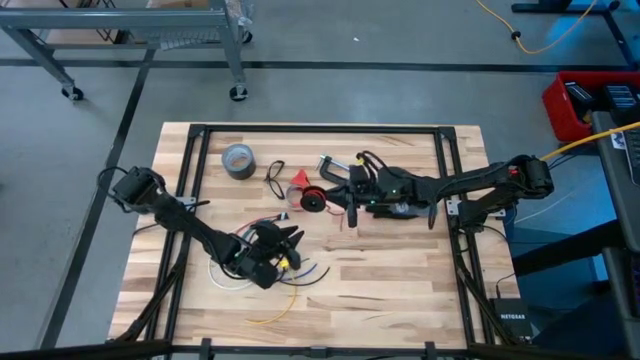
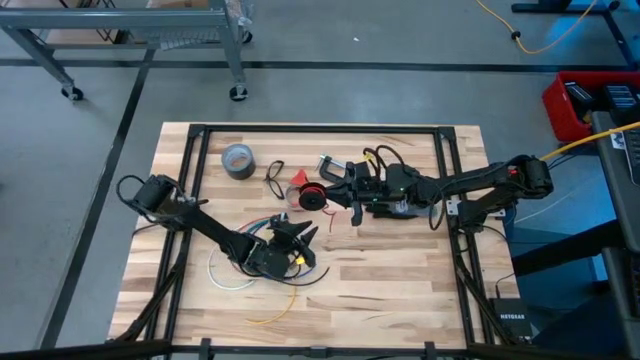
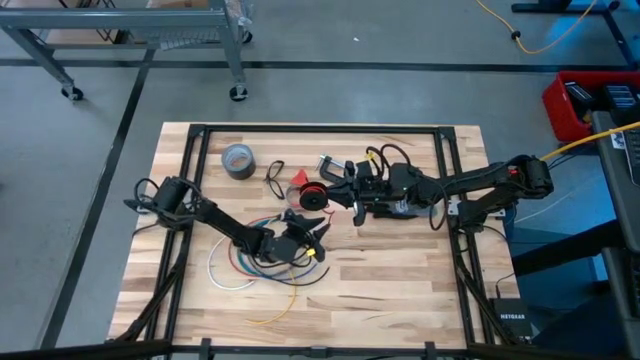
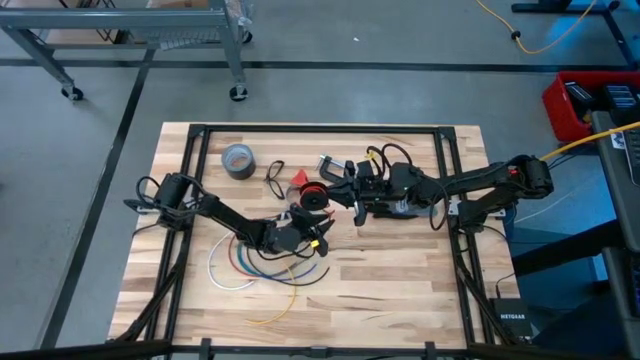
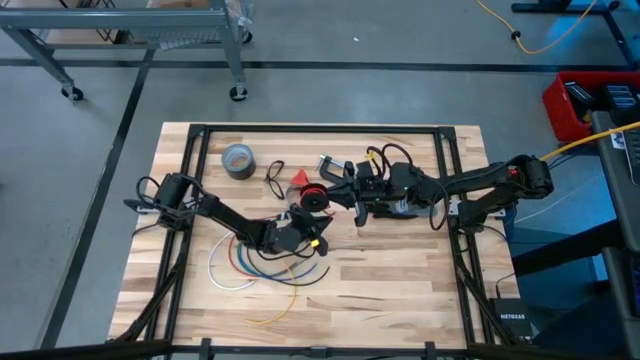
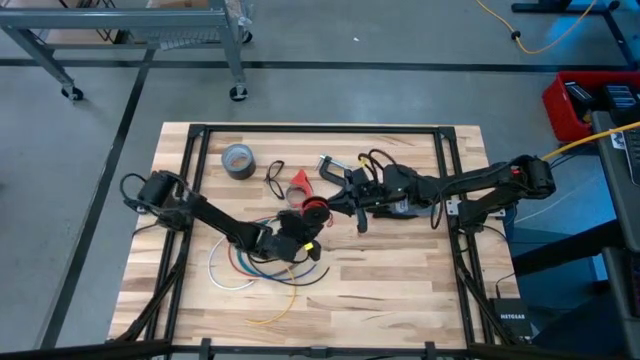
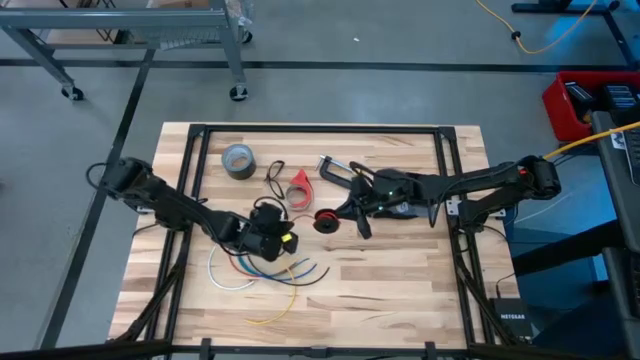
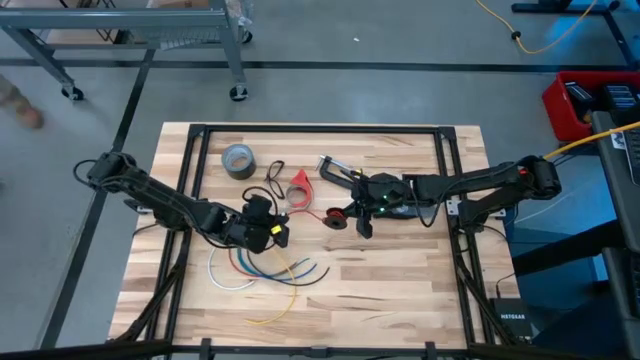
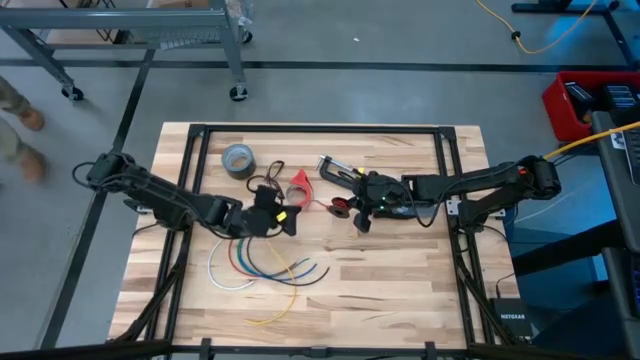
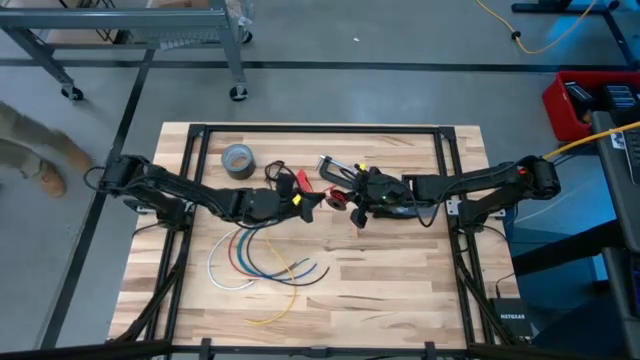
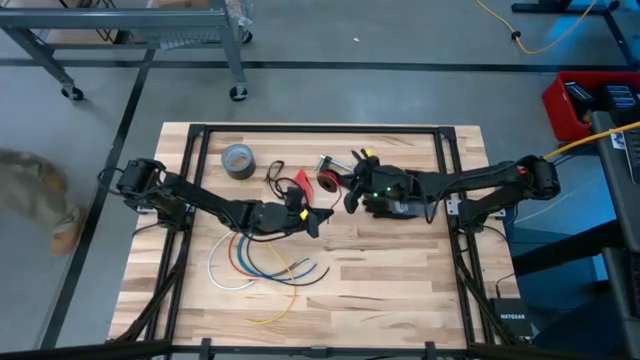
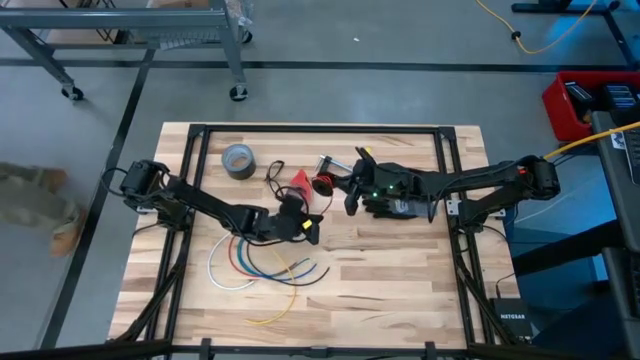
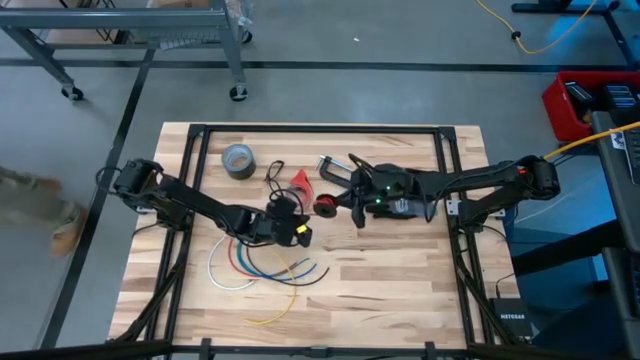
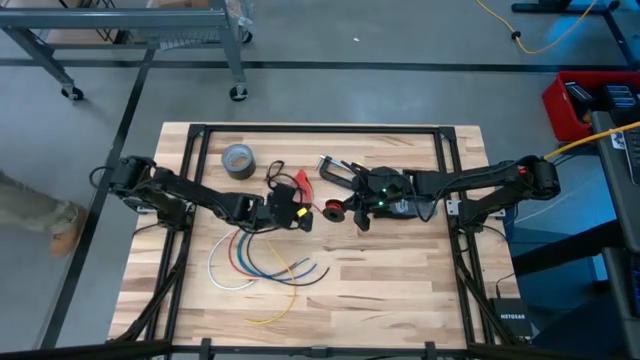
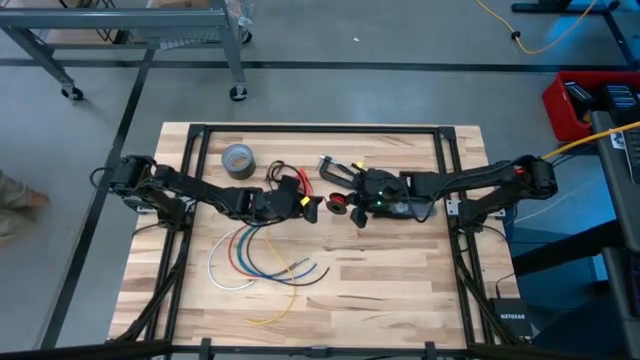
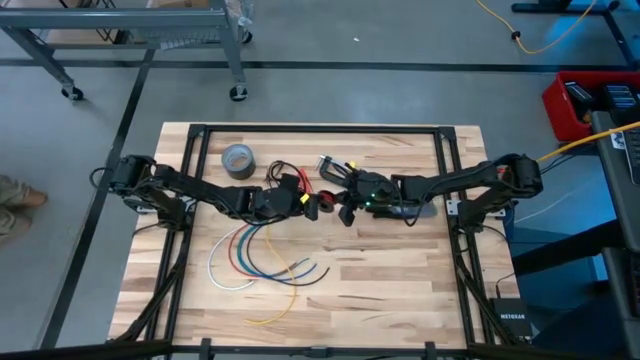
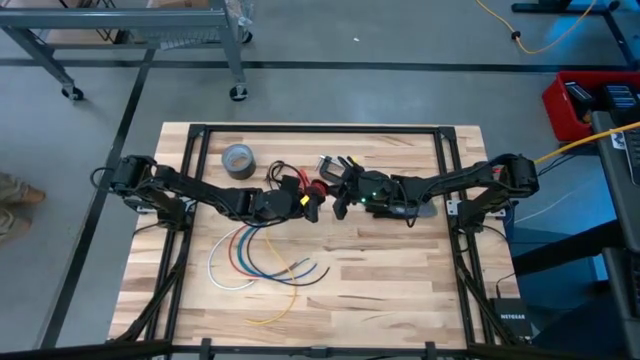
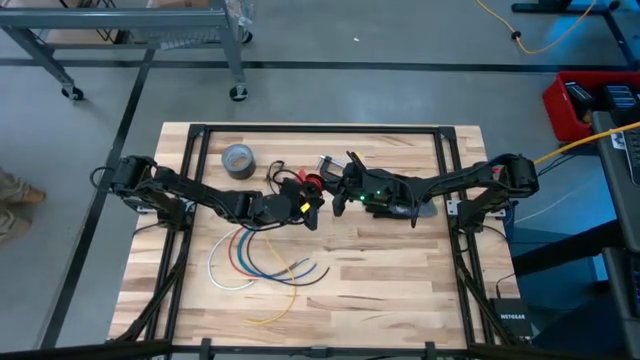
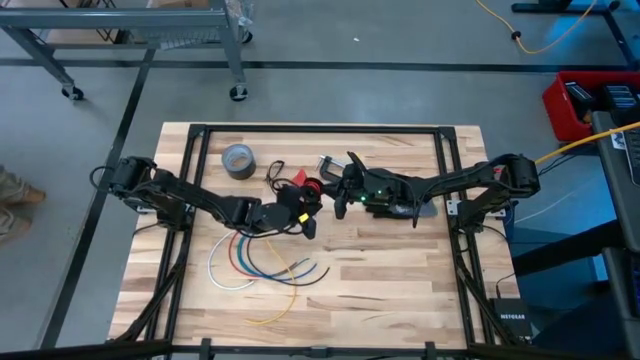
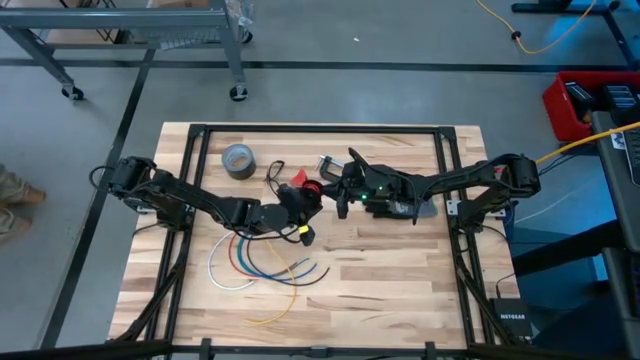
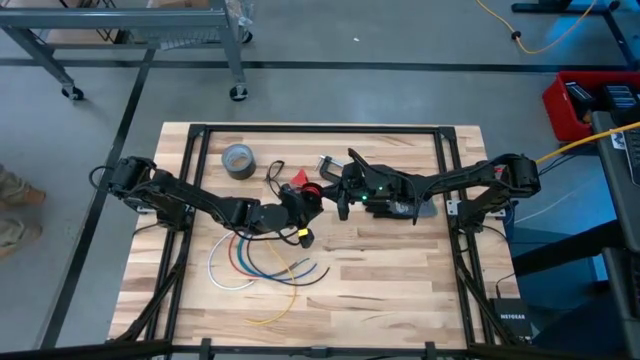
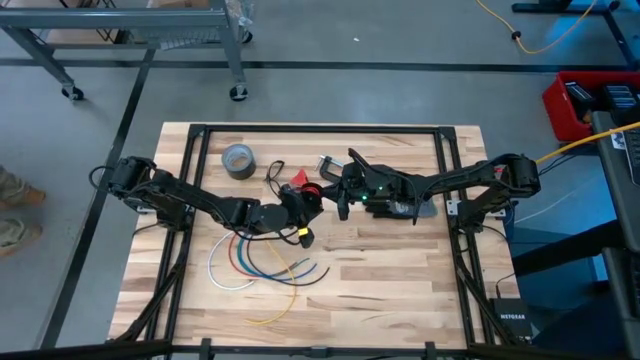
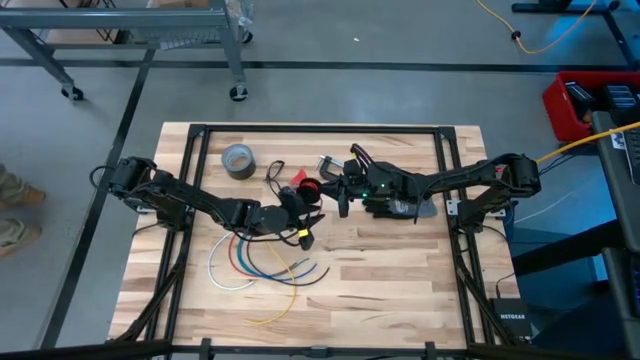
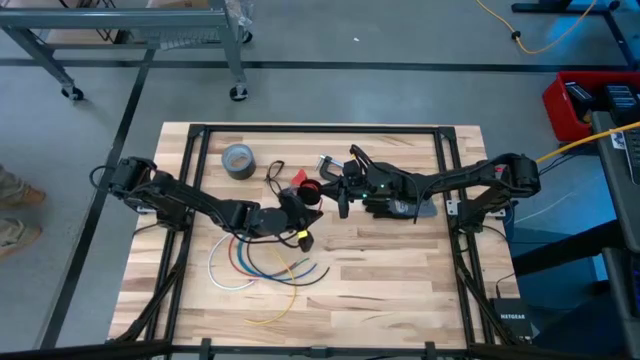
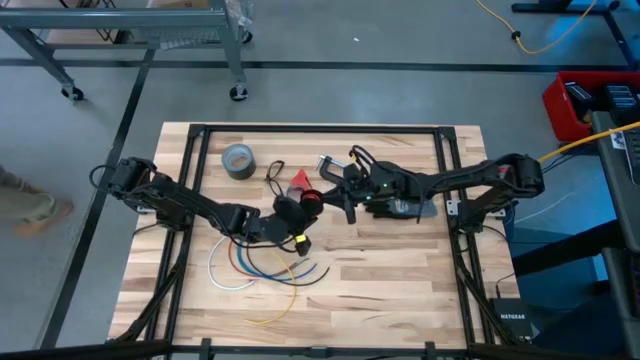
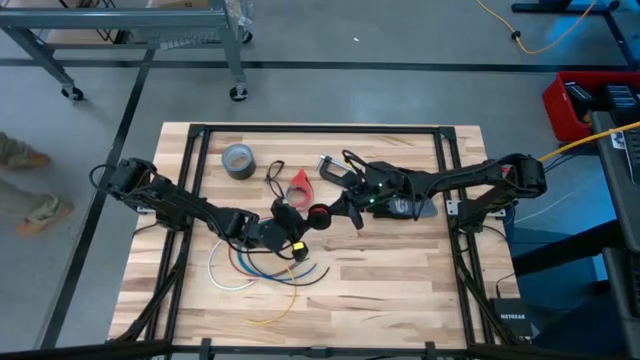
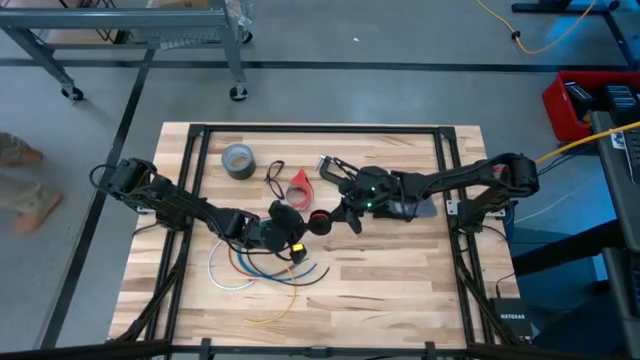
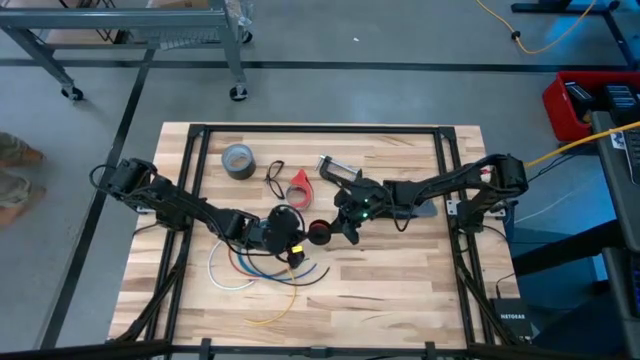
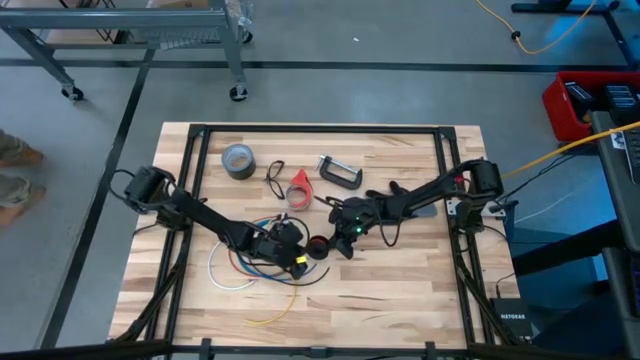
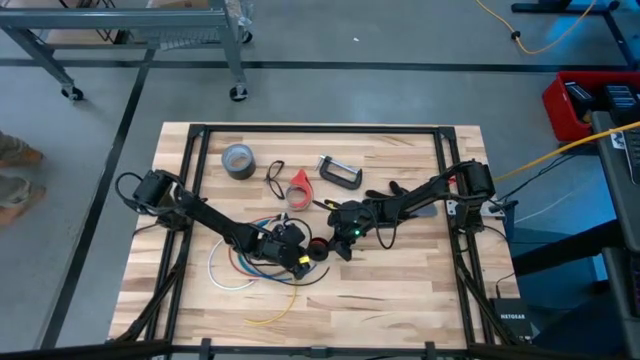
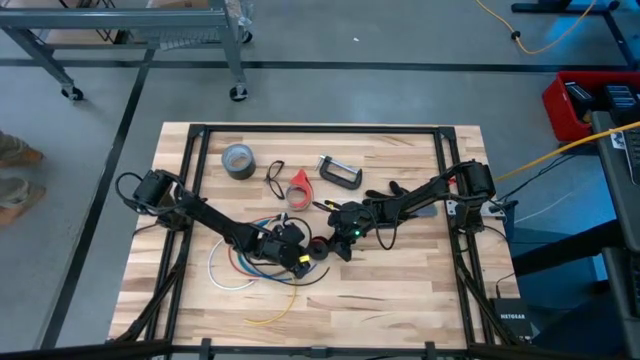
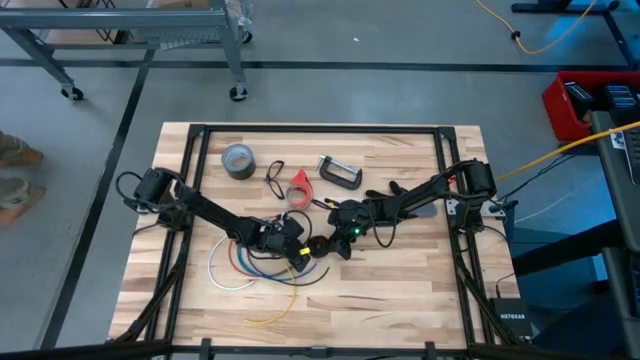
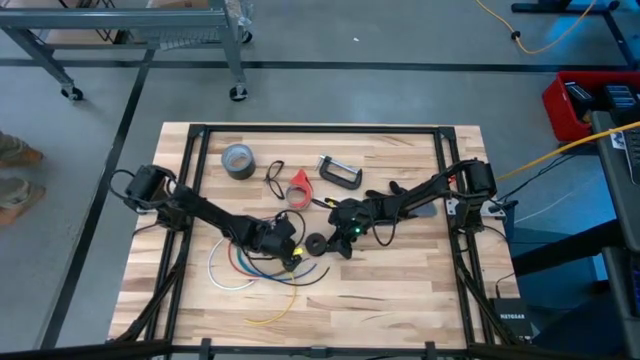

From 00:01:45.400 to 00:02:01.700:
Task: Coil cords
Coil the orange wire on the spool

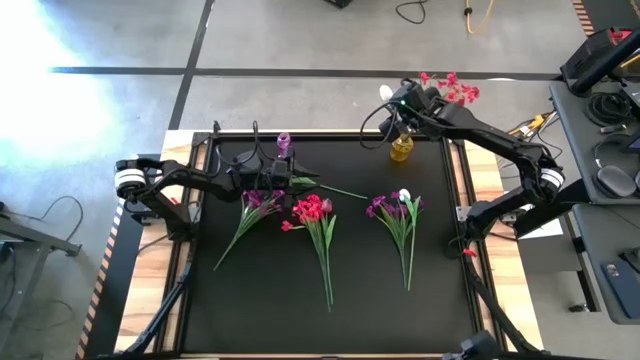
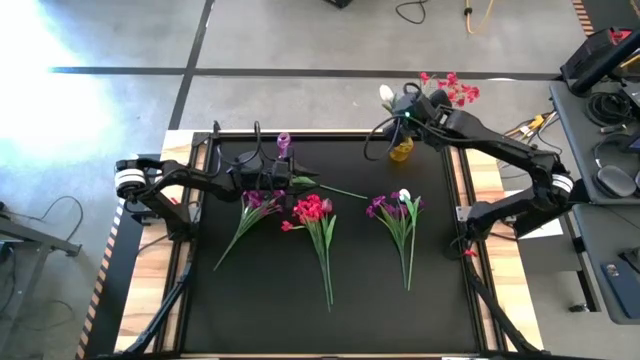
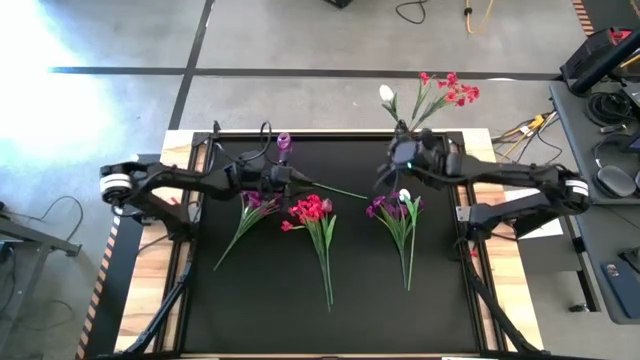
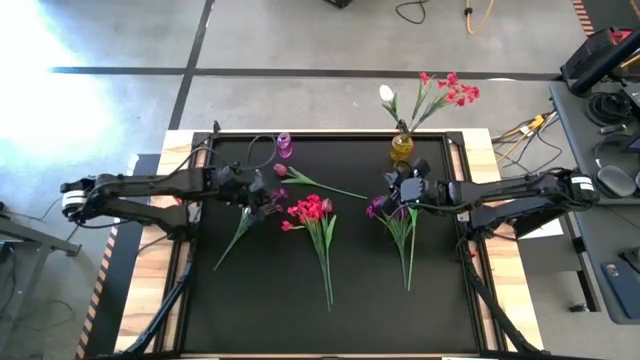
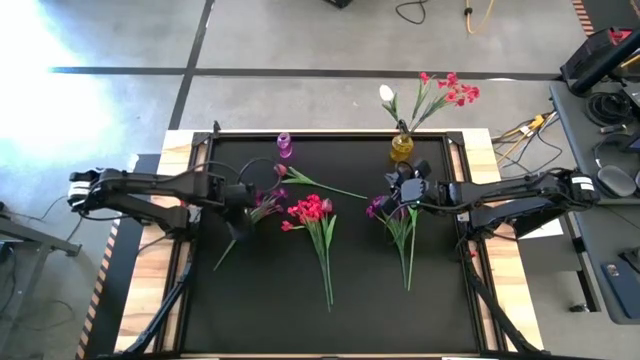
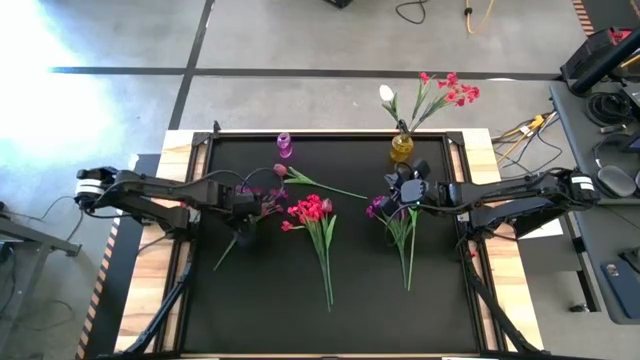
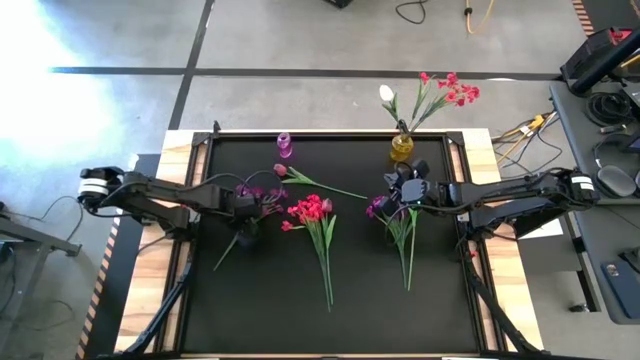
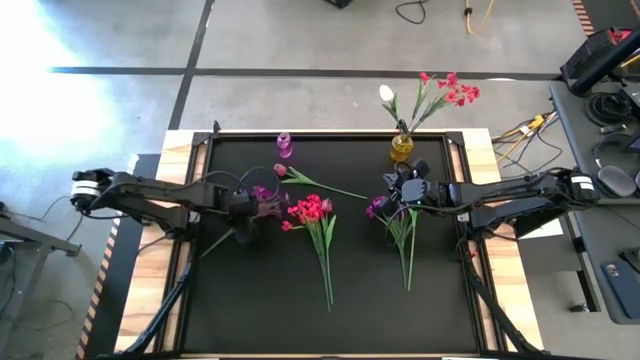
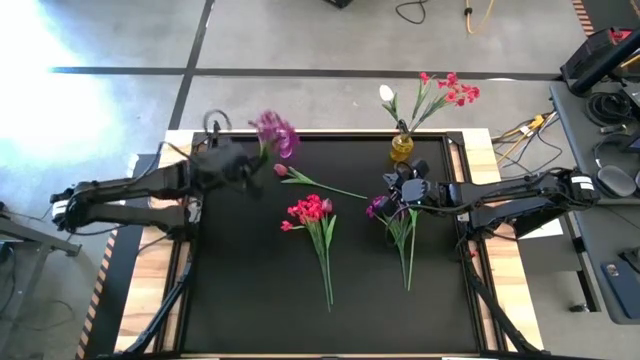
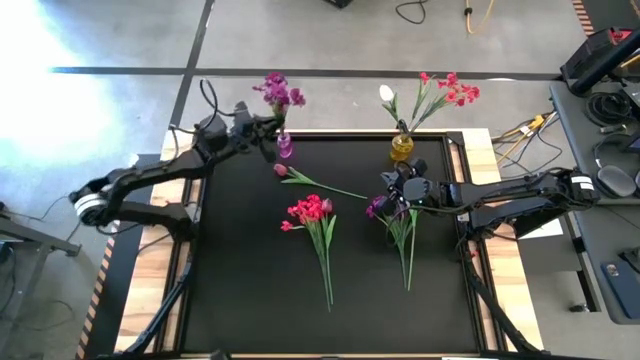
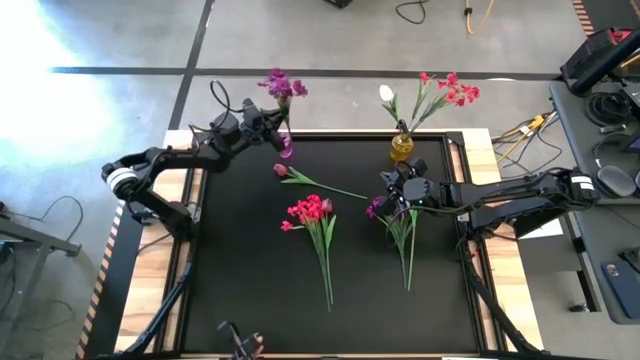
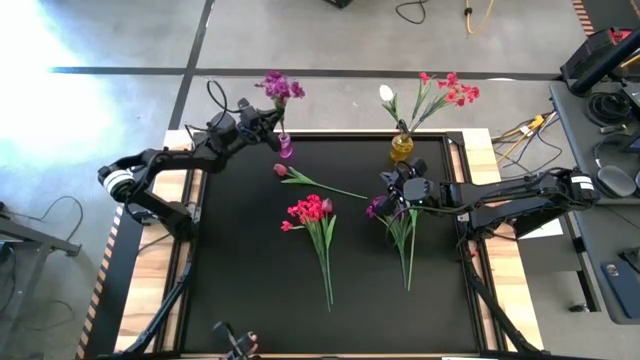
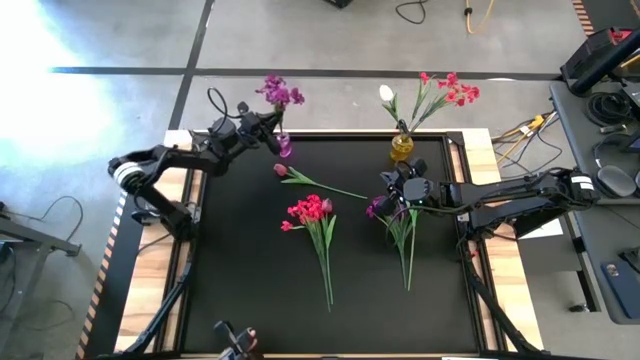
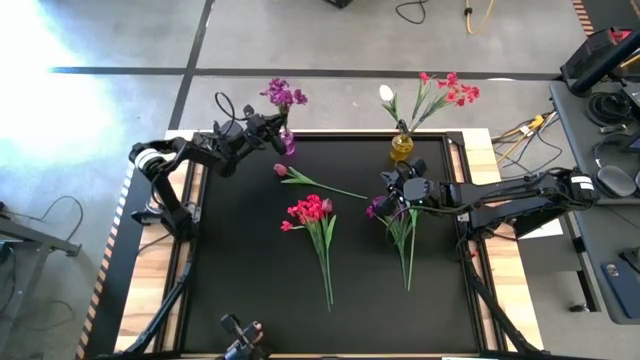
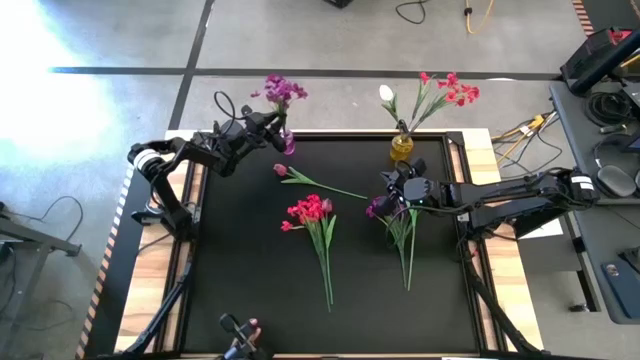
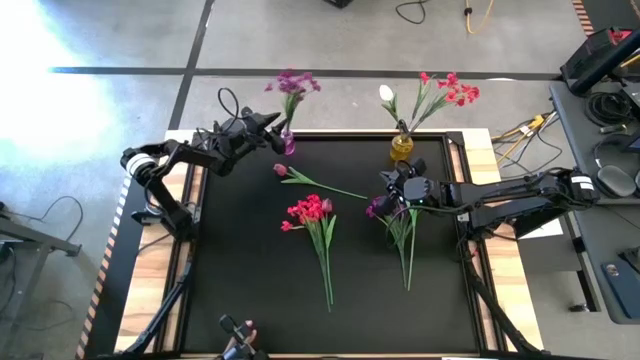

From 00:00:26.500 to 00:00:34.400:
Task: Sort flowers into vase by color
Put the left bouquet of purple flowers into the purple vase
